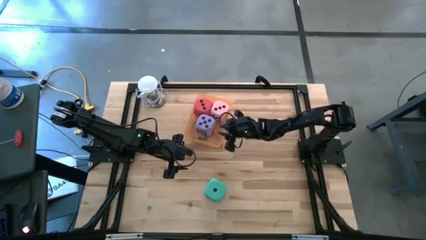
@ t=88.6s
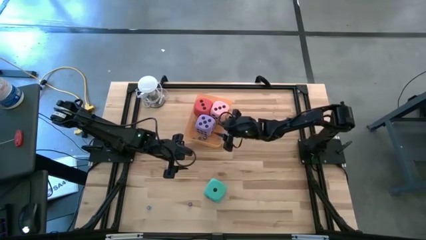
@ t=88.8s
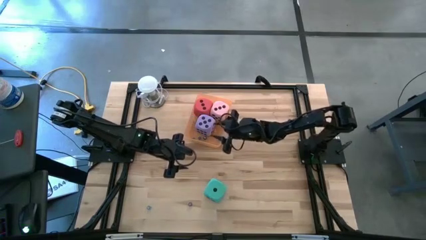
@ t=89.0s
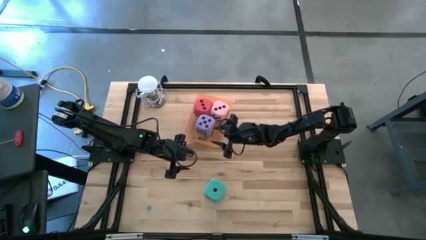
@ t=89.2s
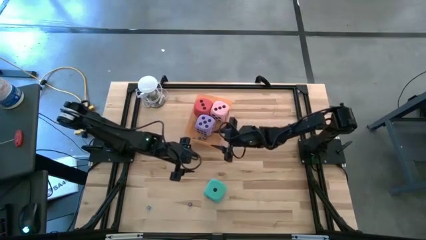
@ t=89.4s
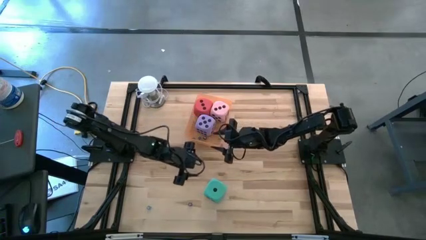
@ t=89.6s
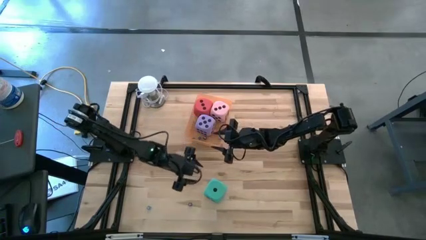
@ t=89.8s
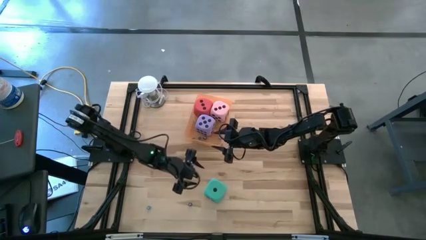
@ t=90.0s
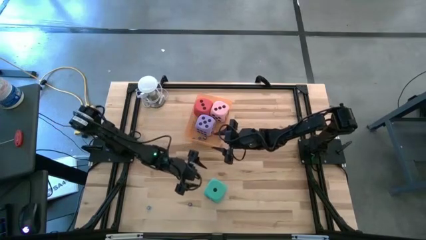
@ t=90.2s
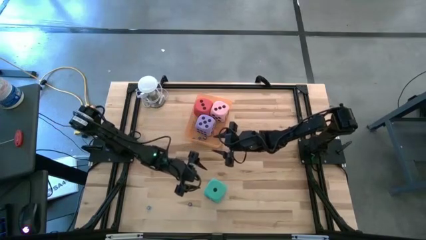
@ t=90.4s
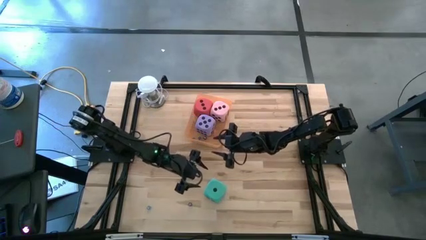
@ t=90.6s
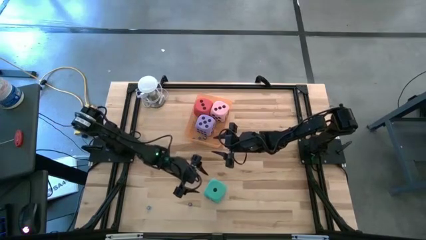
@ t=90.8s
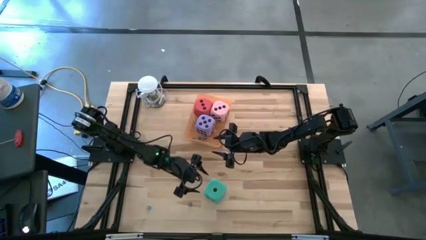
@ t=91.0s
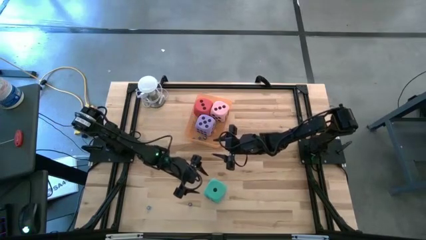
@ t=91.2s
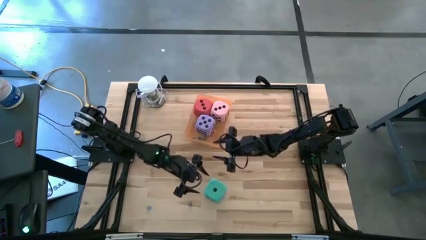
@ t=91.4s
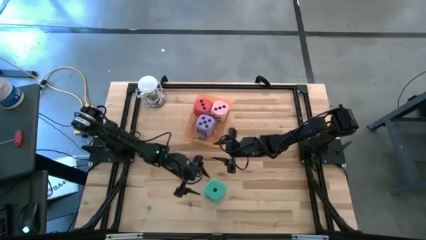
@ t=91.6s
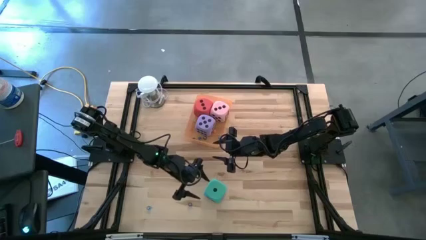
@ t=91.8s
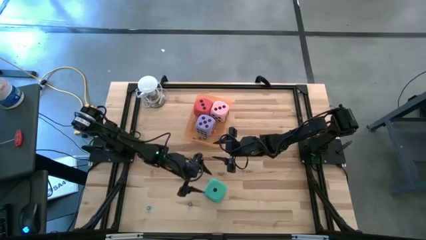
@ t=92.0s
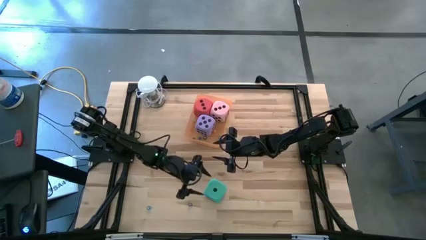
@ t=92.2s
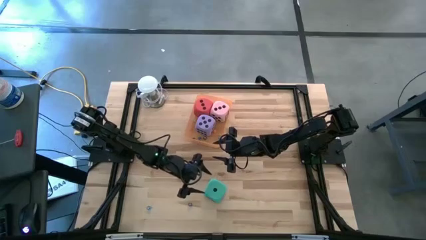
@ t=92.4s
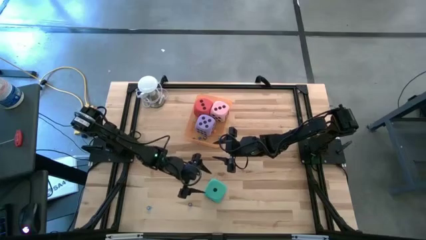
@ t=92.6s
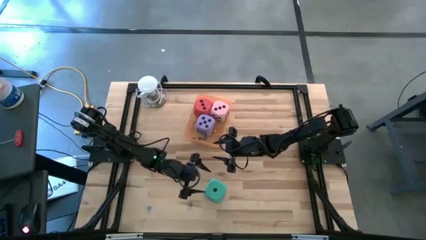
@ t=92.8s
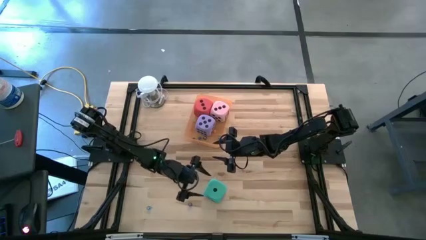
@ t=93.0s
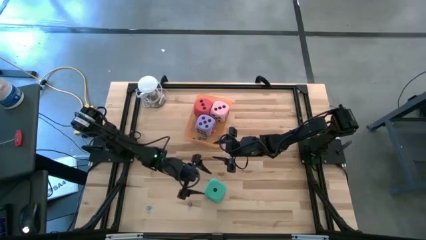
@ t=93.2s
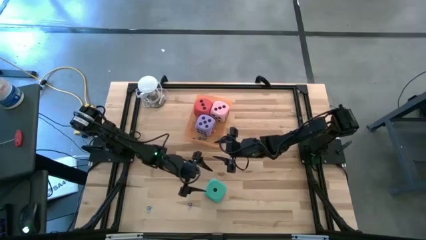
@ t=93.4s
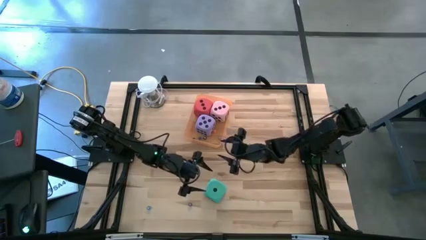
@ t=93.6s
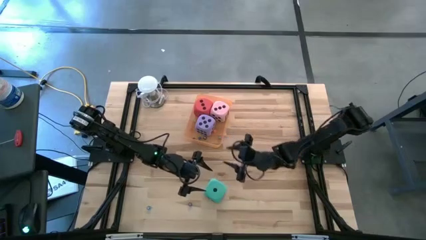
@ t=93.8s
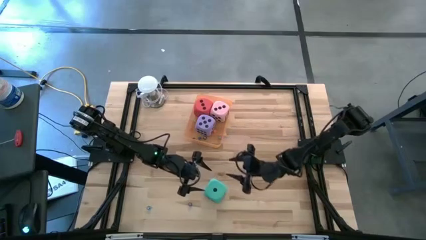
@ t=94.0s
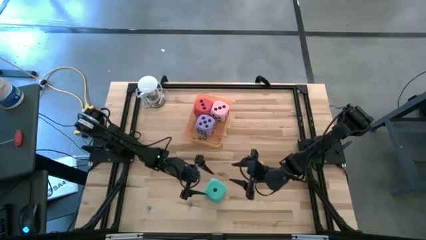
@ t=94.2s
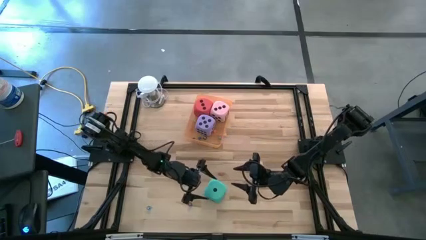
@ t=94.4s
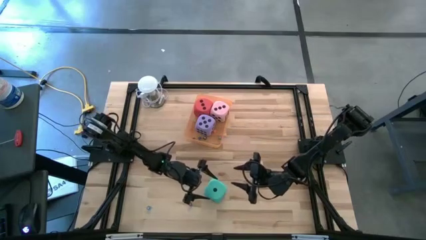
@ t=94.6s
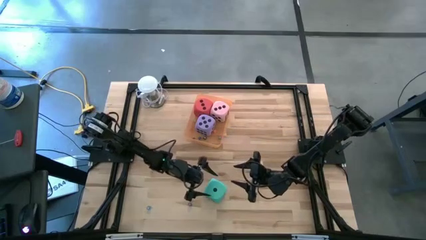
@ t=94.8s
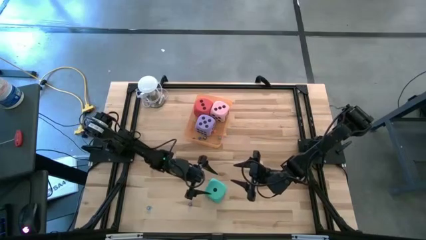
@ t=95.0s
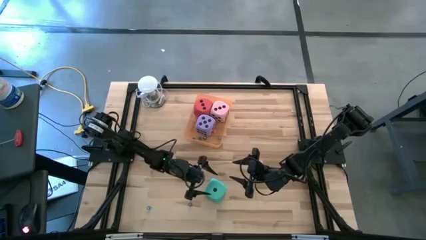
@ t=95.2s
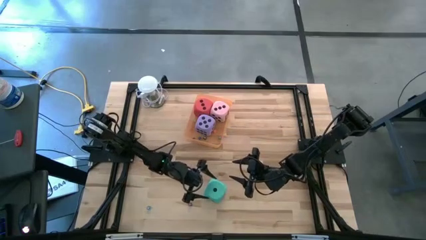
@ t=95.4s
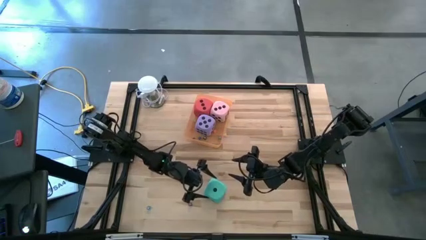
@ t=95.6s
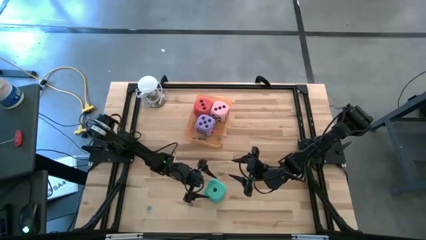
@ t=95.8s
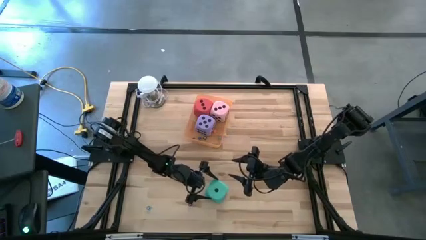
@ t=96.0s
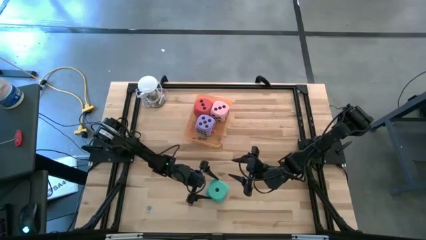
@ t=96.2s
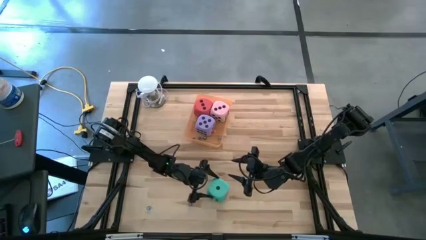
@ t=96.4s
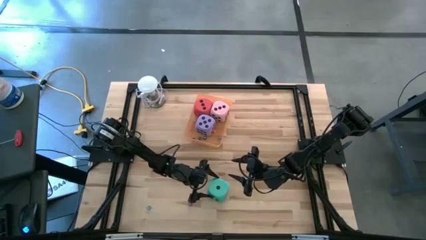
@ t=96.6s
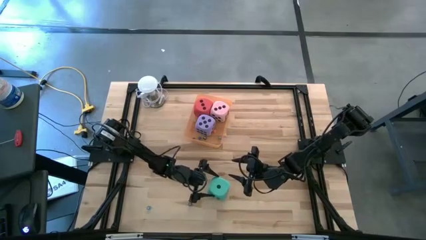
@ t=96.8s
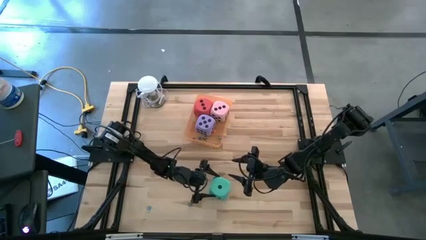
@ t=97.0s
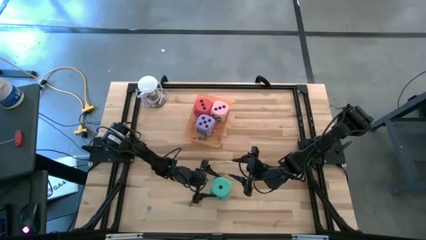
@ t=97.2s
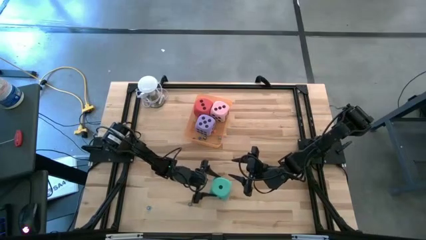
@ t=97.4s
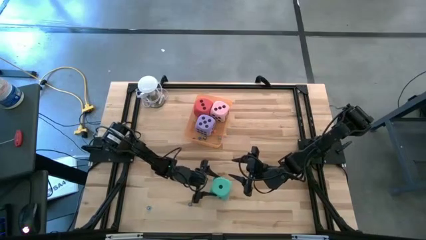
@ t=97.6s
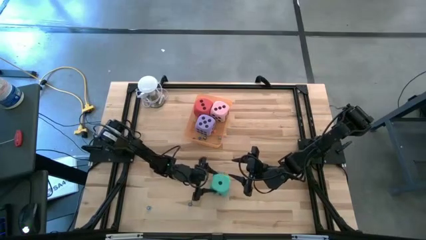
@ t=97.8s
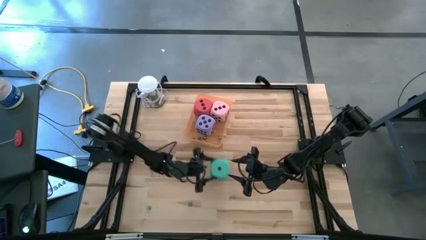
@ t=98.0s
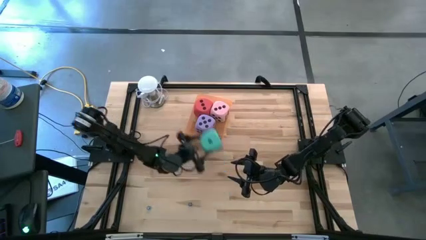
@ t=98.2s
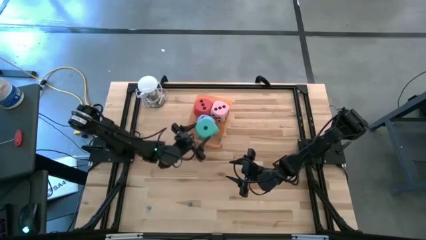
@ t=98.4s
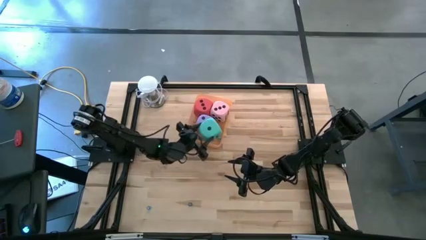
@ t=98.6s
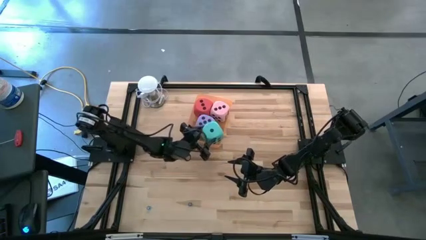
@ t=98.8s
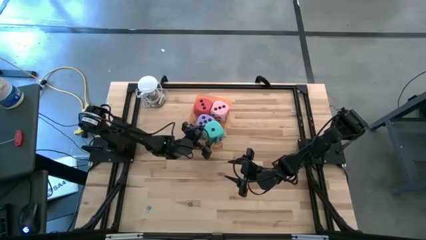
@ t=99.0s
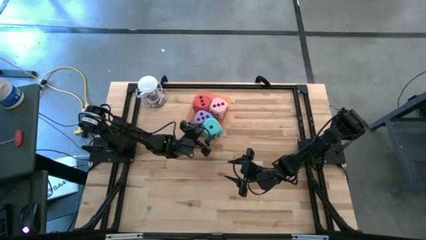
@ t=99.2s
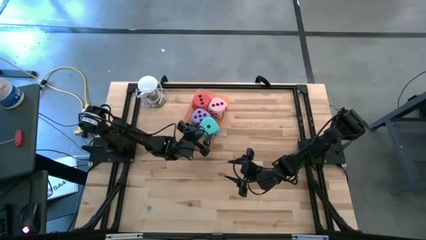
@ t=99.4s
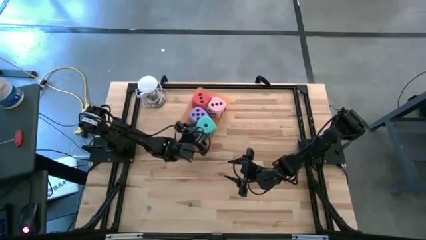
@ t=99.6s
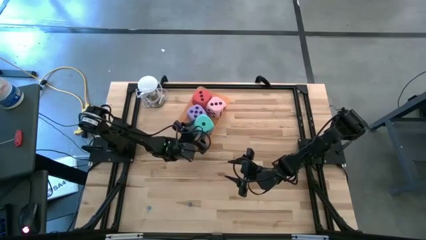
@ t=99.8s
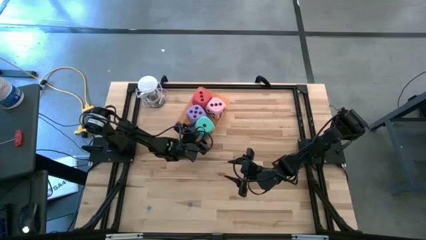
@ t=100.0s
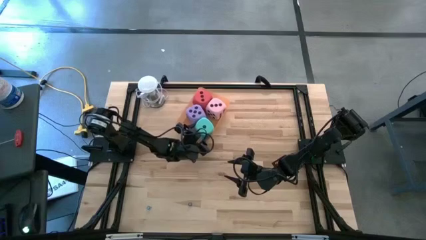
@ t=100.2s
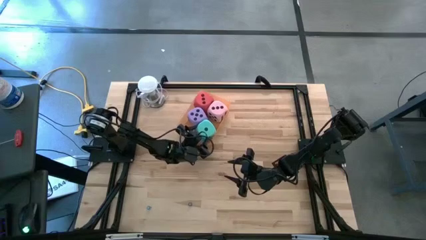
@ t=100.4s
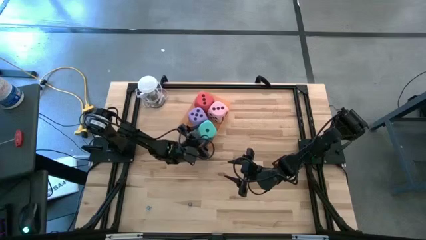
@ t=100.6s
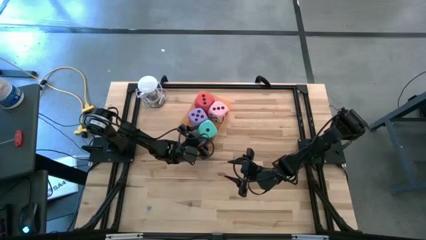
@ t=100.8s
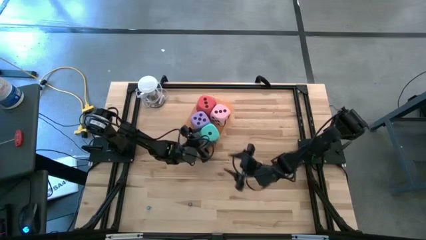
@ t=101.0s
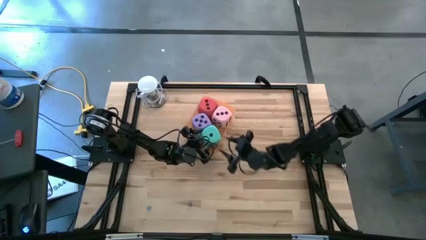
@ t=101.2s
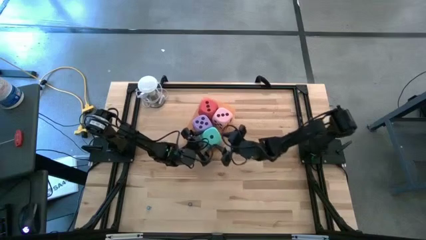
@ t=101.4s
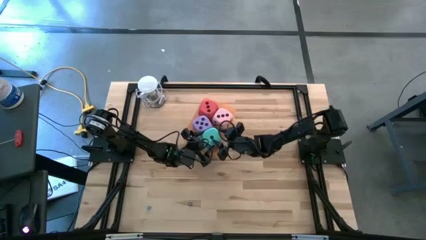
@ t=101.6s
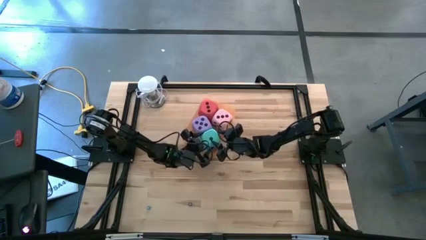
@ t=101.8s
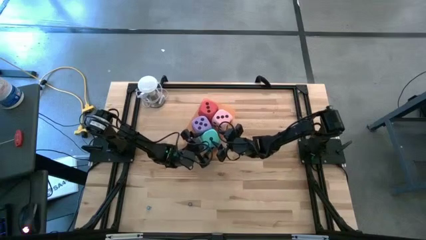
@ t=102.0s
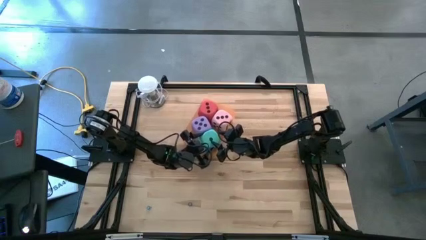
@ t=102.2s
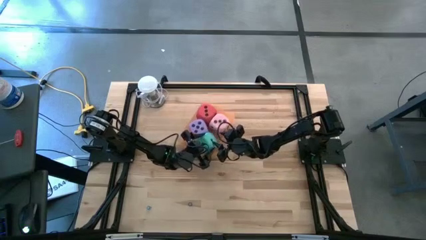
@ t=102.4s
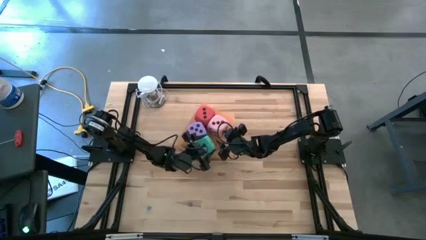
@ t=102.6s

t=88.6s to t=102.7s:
Task: Pick & Place Dice
Put the big blue die into the orange bin

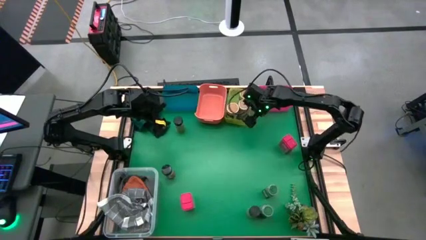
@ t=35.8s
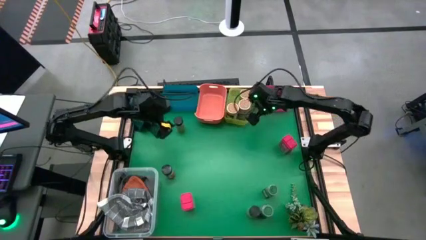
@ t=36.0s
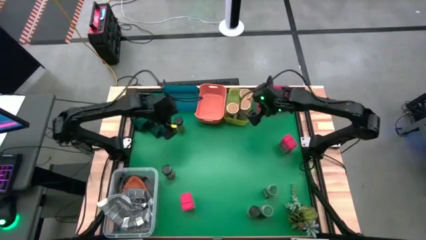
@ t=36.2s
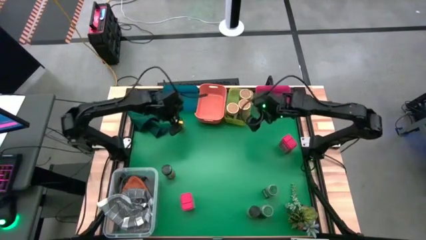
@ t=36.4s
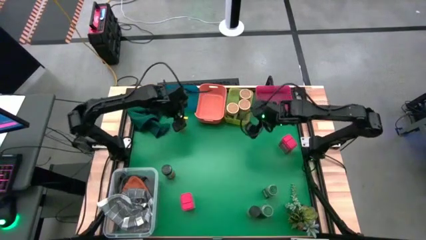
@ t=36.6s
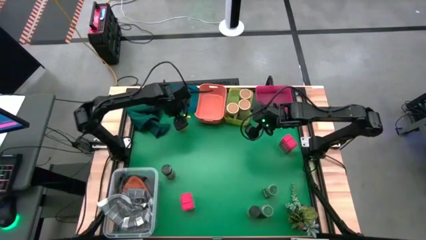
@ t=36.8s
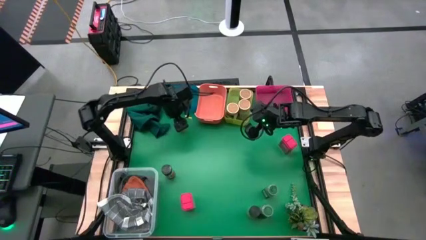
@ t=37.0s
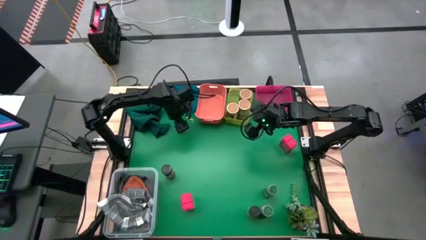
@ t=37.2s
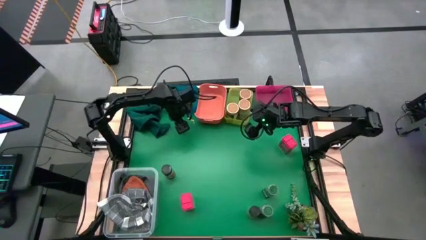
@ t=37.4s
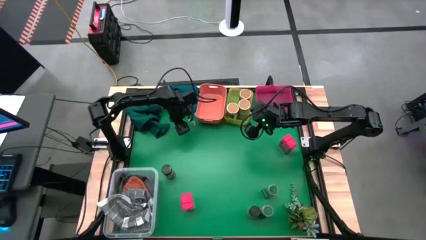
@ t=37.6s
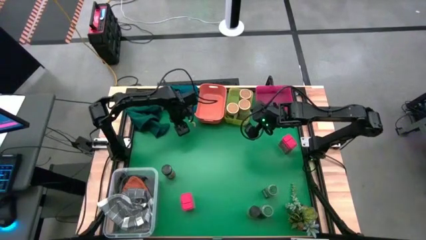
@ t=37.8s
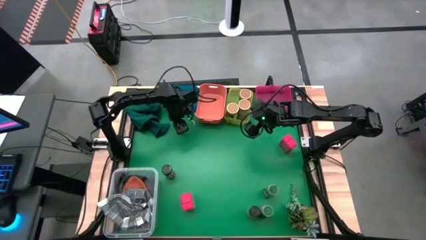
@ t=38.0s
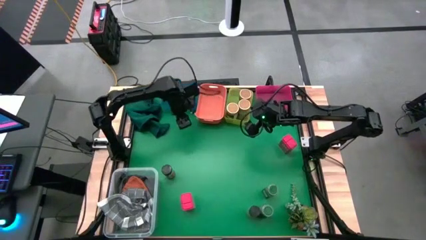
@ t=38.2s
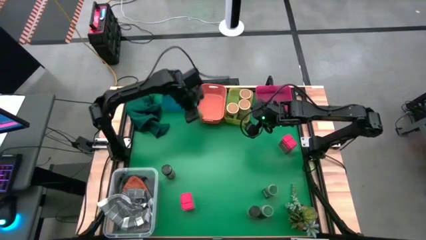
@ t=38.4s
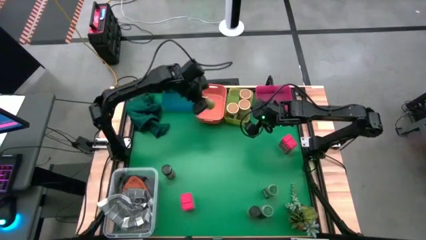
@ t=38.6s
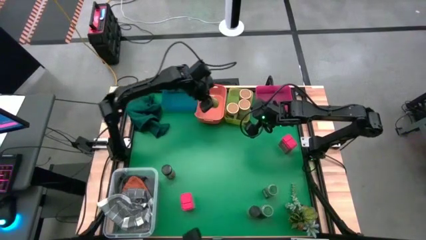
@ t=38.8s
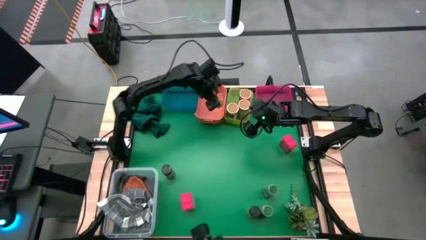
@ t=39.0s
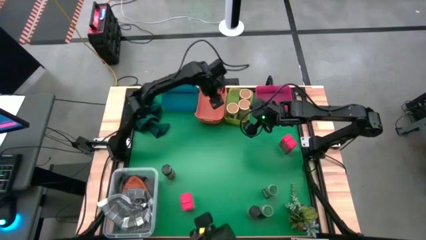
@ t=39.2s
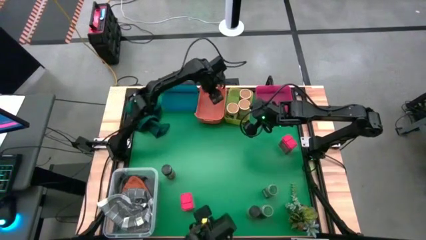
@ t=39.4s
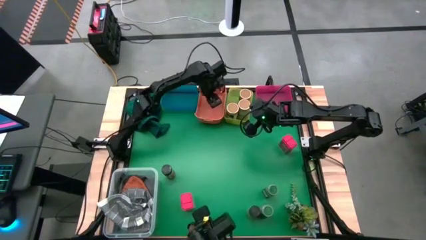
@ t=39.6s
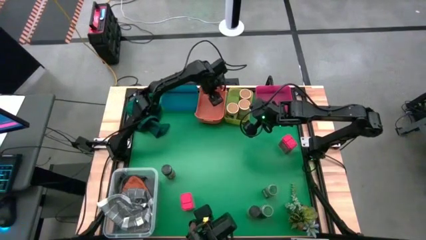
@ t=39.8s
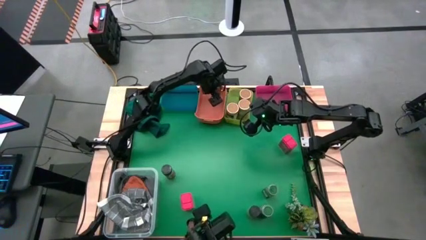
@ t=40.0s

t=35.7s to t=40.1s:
Task: Sort spices by type
Put the top left black seasoning bottle into the orange bin
